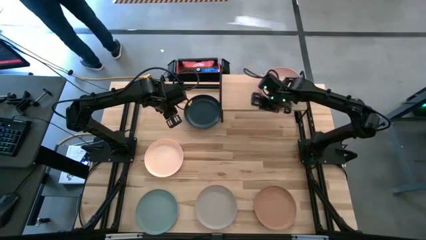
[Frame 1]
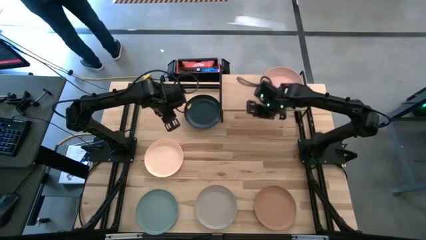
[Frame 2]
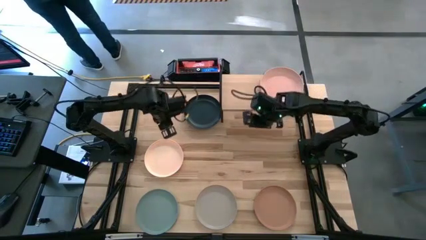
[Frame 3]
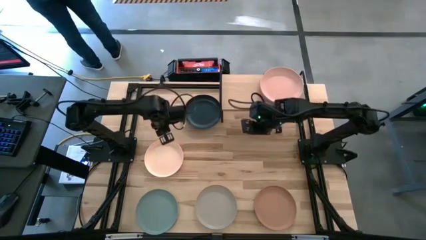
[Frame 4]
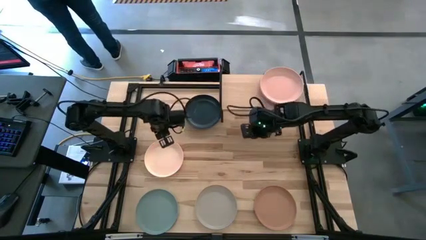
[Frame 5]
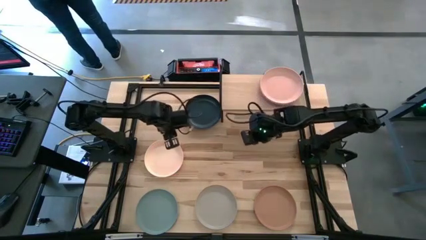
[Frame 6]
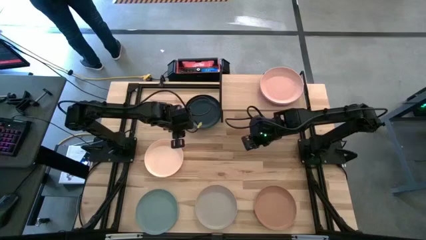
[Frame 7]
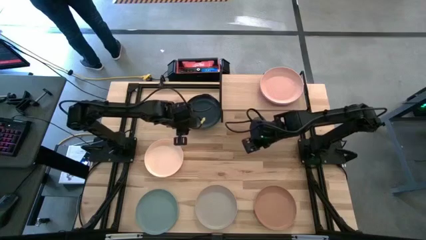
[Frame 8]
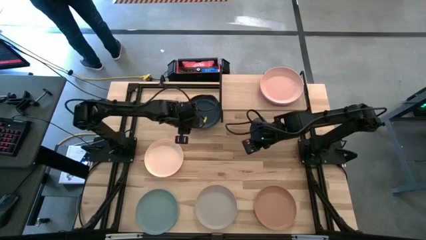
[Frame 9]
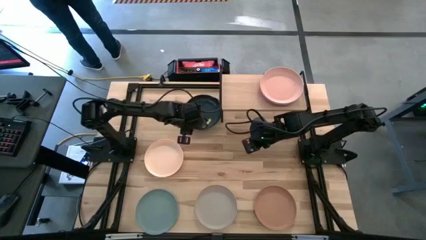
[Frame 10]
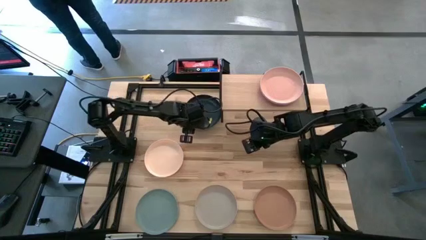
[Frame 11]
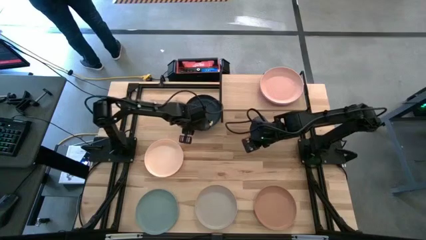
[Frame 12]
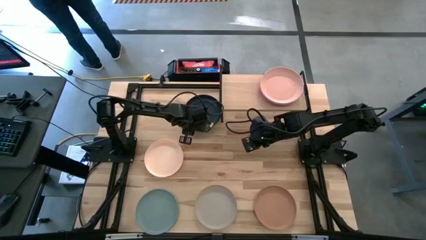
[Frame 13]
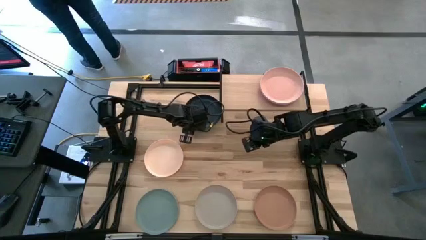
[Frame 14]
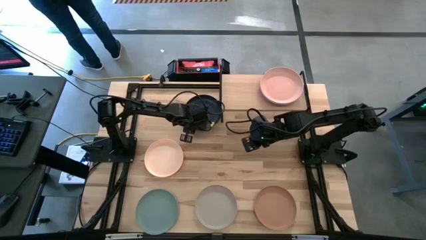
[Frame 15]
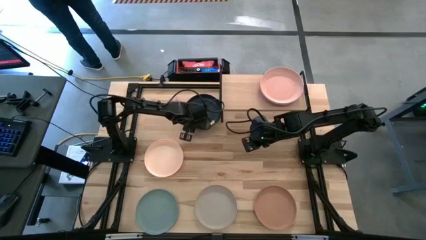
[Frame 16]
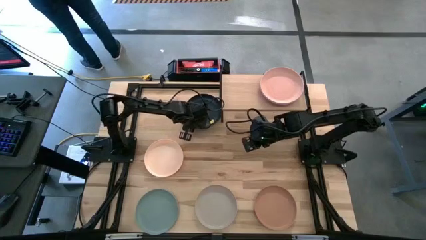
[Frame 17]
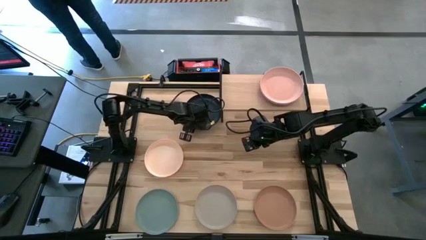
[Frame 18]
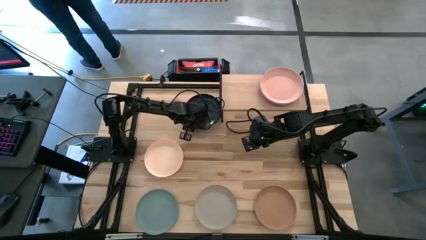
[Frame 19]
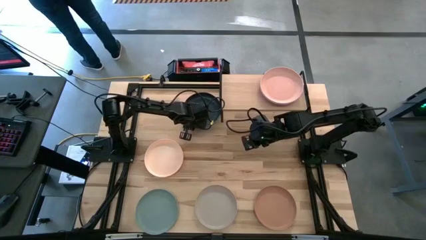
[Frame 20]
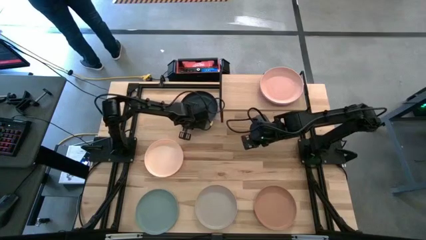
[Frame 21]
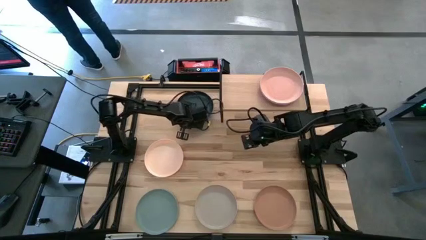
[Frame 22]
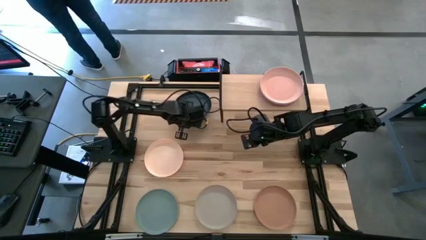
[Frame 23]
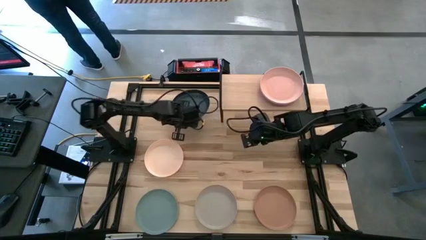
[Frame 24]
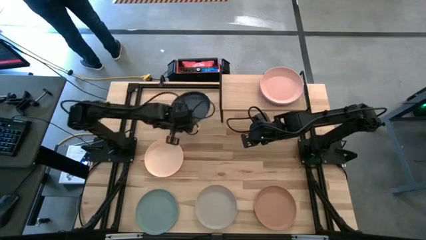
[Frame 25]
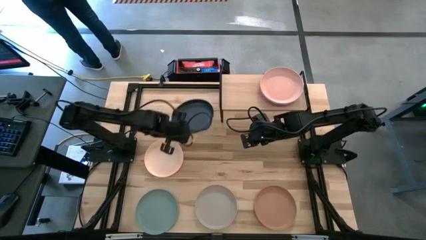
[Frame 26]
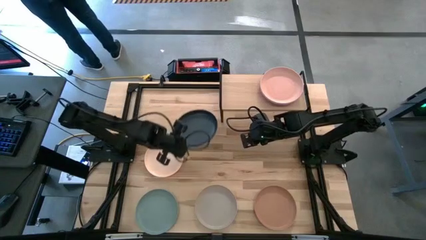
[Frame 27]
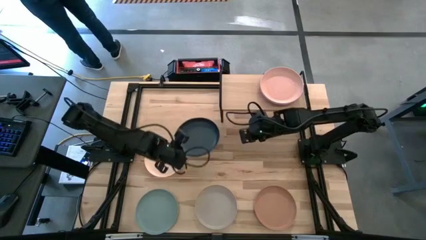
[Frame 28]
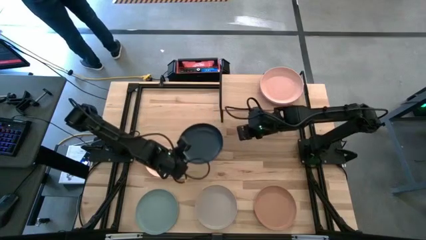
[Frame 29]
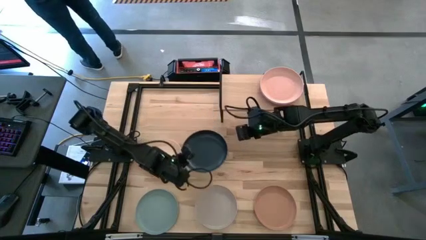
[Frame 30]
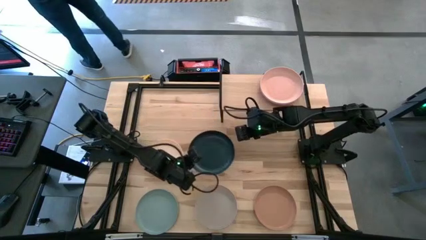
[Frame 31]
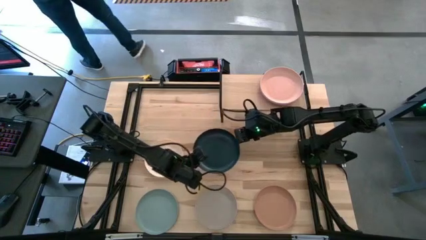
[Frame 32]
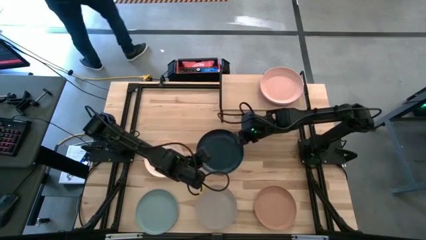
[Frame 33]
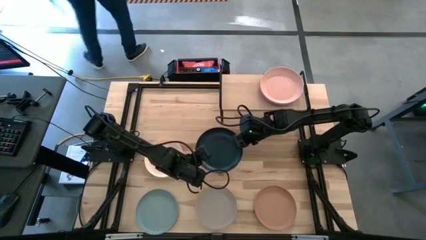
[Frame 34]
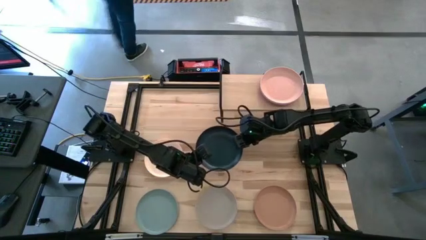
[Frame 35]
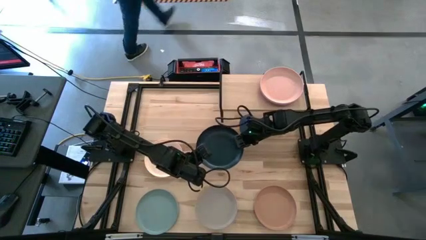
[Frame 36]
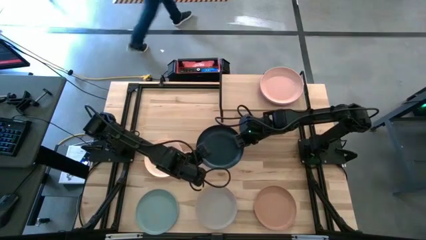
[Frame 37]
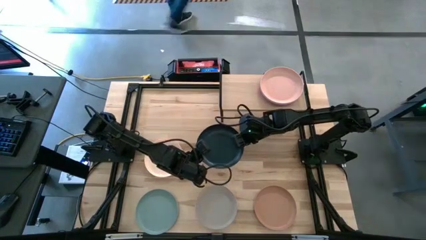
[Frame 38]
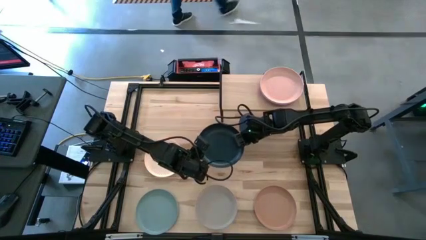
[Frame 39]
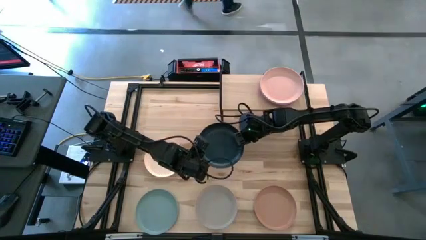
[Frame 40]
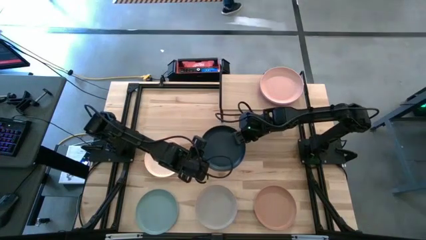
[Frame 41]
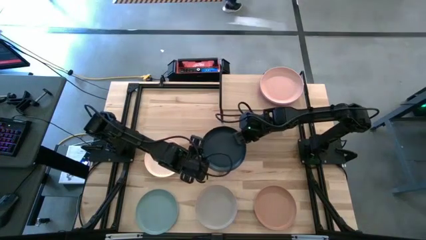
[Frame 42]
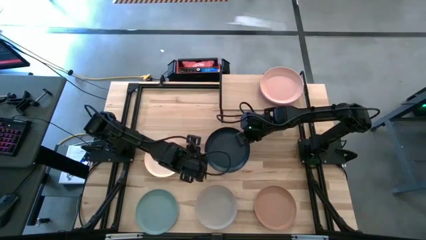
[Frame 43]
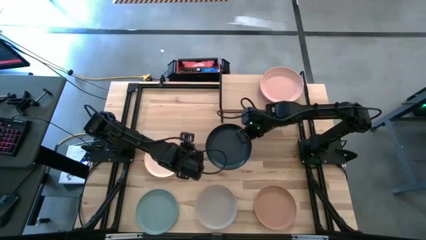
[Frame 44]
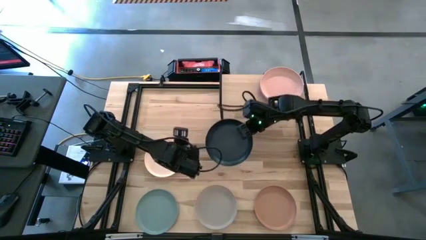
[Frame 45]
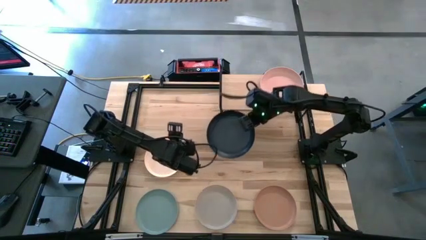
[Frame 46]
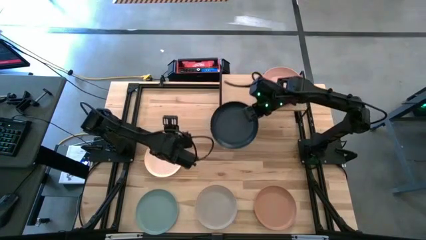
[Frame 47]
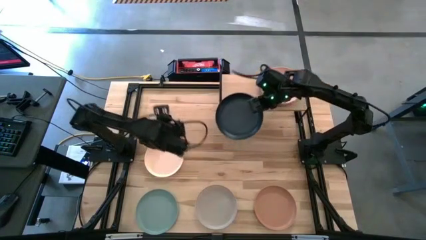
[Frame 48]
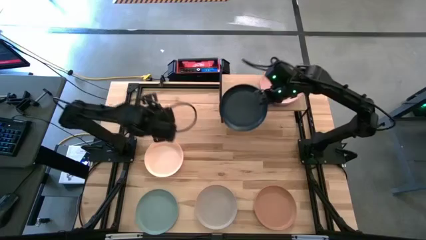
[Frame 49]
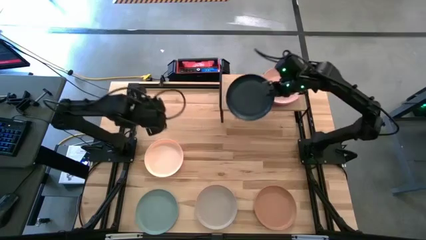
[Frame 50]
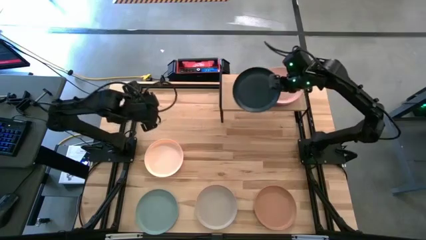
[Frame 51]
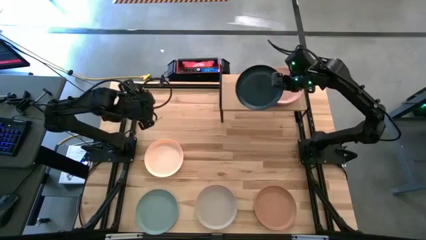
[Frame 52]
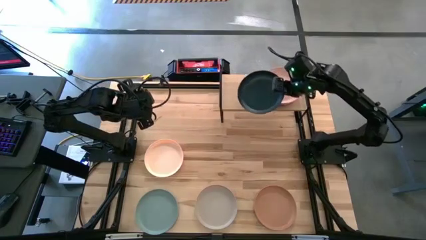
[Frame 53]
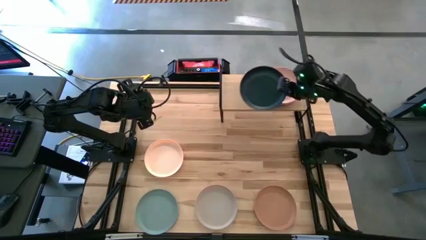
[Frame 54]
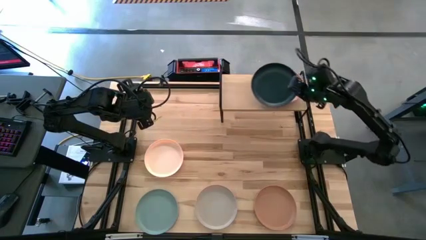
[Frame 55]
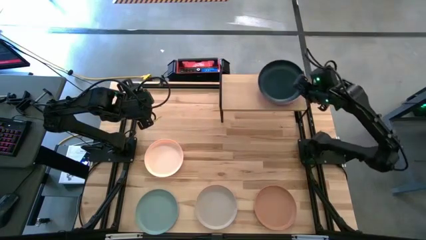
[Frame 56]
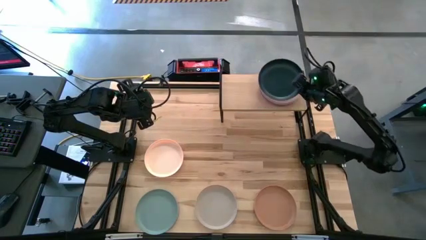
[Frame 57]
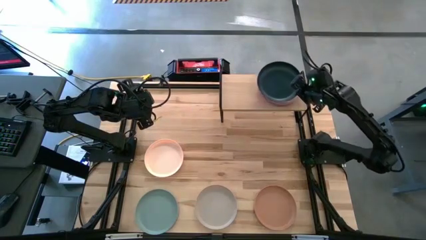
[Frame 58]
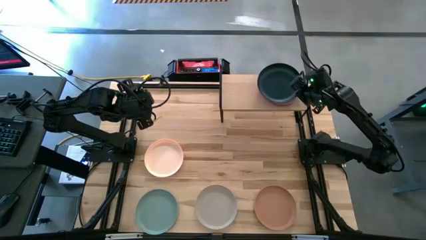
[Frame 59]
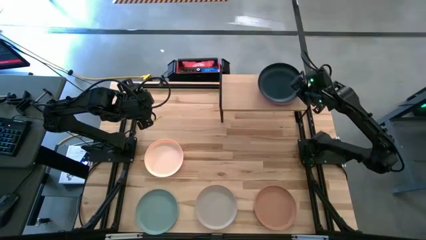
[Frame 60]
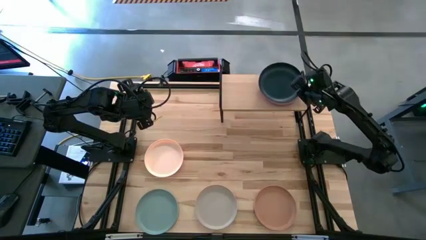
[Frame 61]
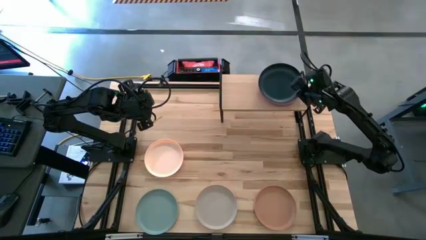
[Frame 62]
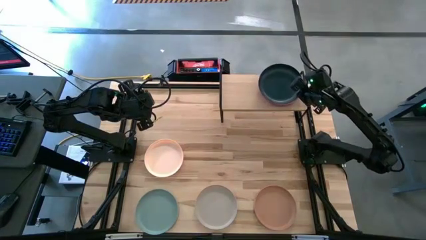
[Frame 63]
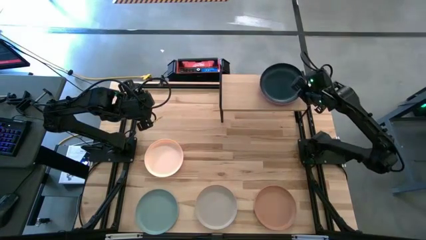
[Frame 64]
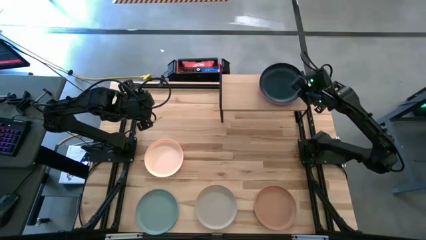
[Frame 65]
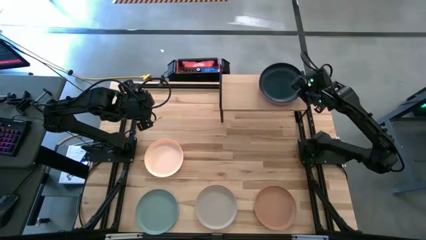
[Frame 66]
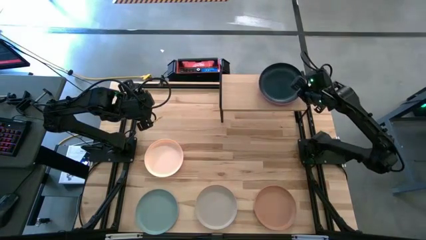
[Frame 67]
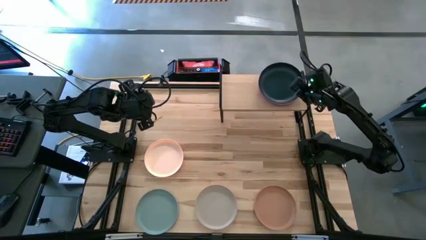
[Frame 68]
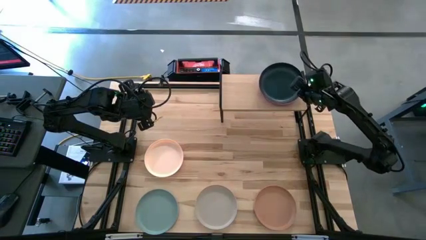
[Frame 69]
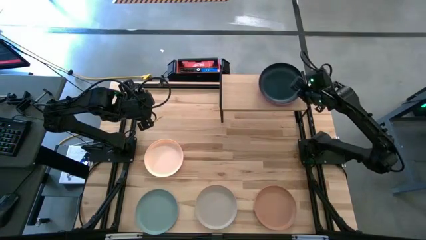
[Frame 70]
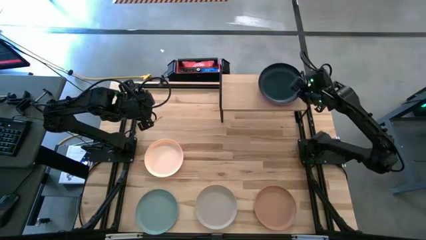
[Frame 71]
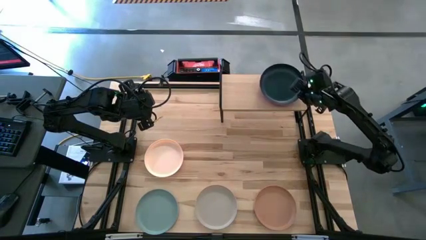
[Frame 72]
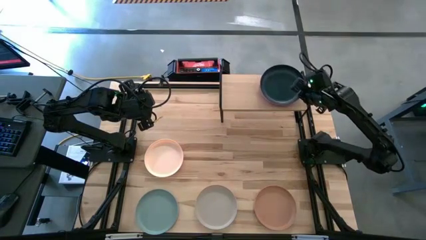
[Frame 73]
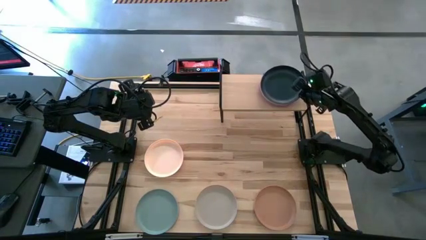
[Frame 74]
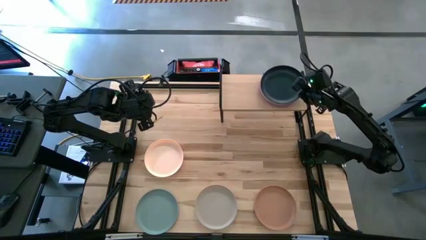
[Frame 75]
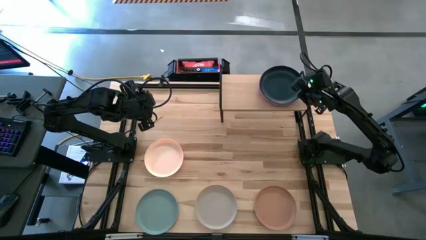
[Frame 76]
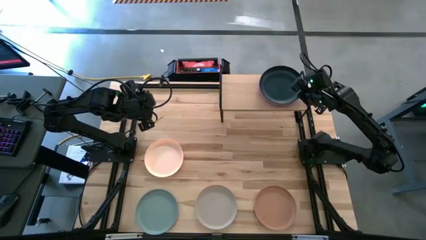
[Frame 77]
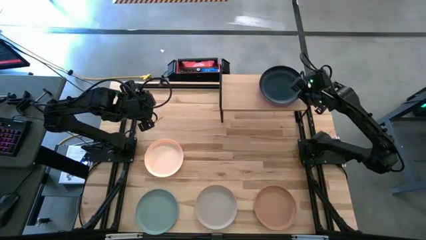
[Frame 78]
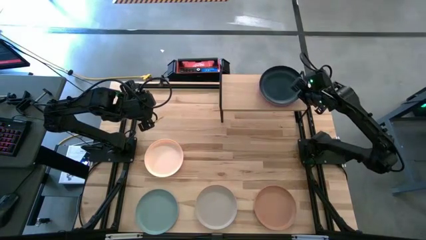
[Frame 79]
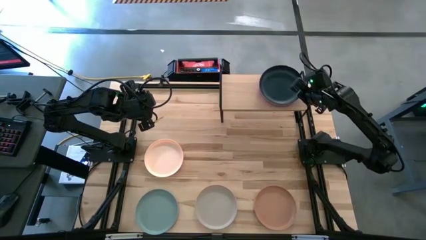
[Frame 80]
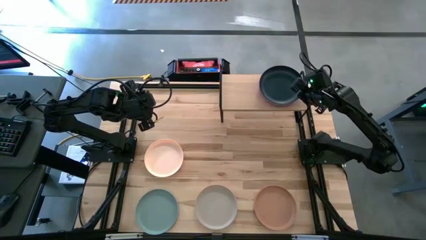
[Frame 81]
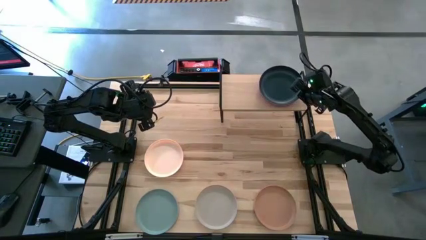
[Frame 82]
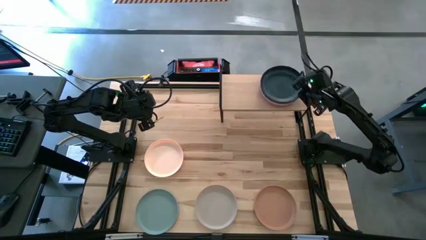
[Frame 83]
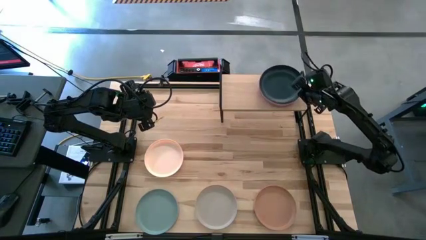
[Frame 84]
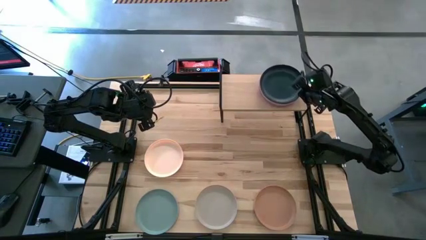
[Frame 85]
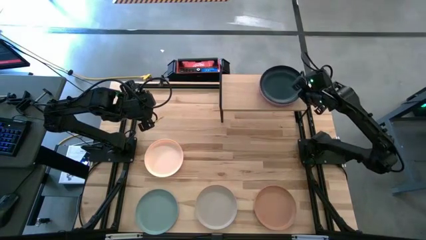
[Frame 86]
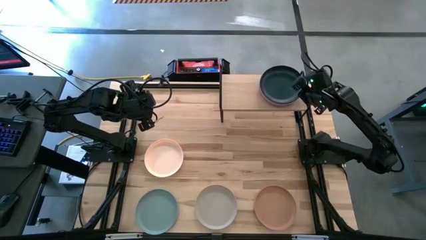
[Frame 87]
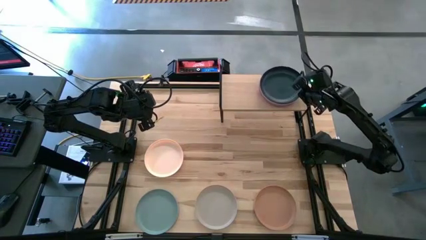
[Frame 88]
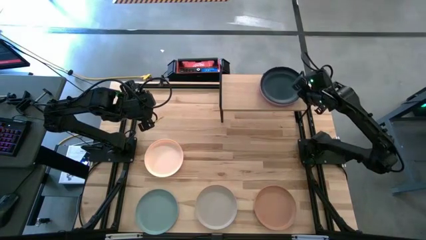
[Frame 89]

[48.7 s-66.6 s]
Task: Place and stack plates onto a shelf
Stack the black plate on top of the light pink plate on the shelf
